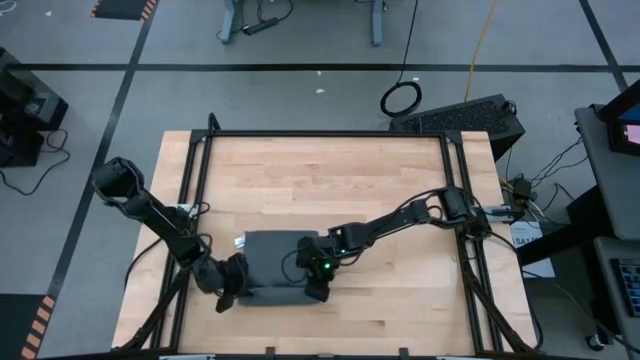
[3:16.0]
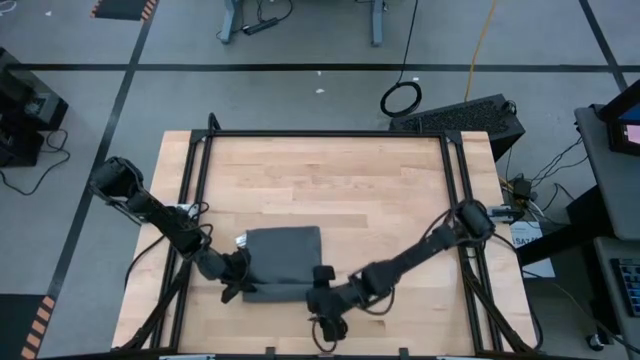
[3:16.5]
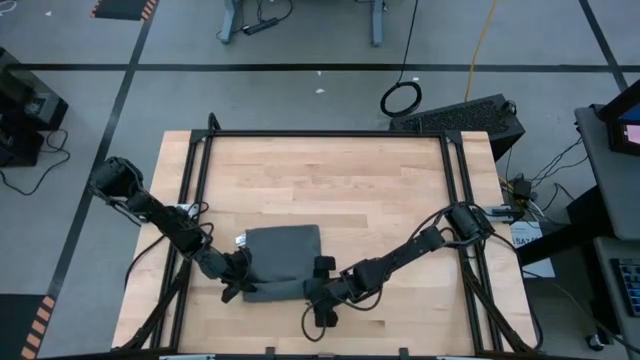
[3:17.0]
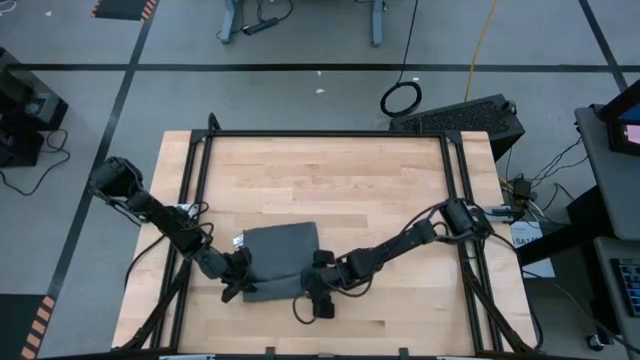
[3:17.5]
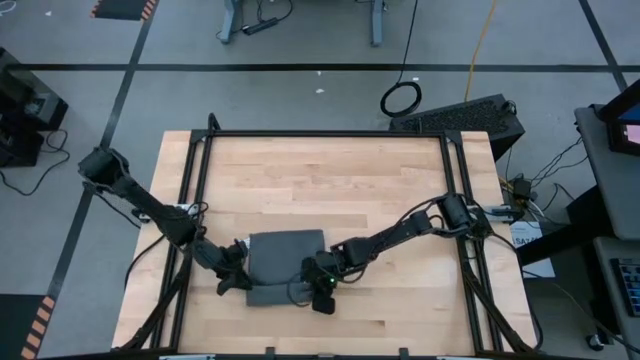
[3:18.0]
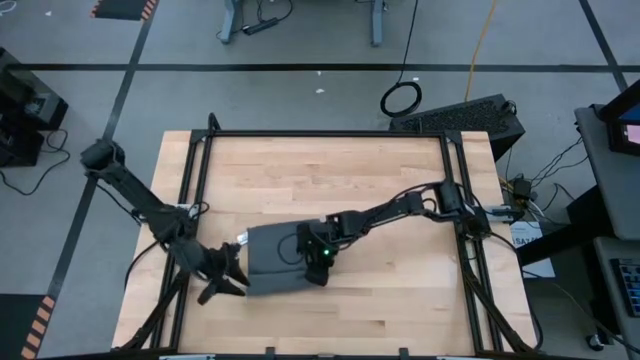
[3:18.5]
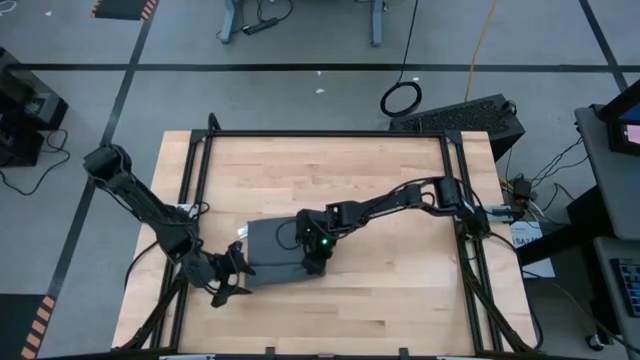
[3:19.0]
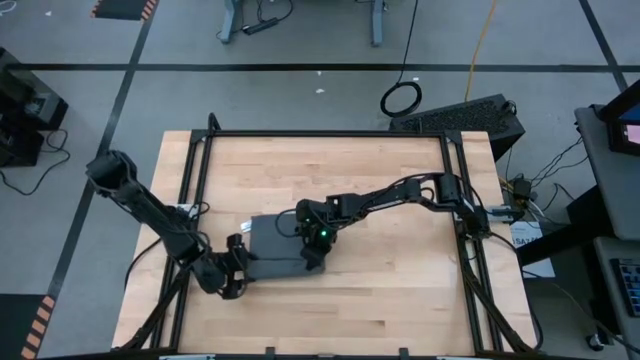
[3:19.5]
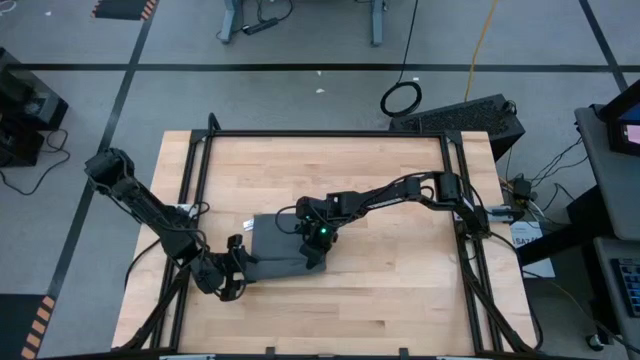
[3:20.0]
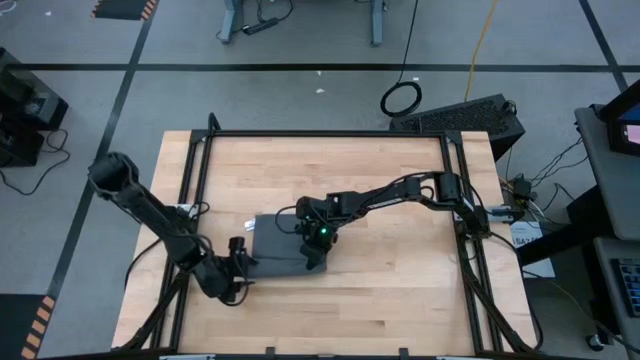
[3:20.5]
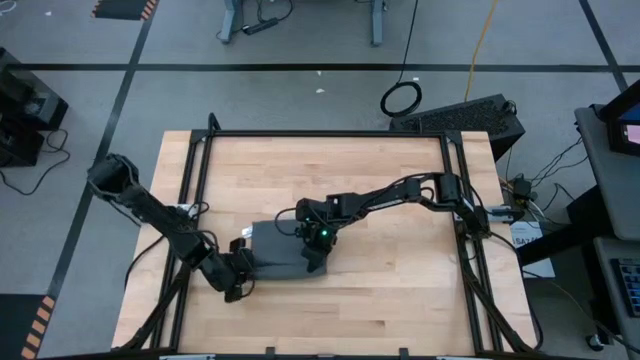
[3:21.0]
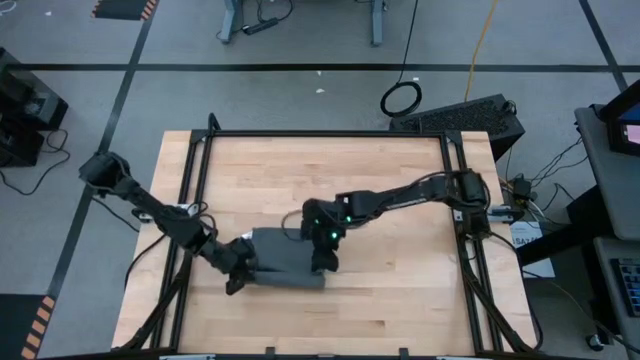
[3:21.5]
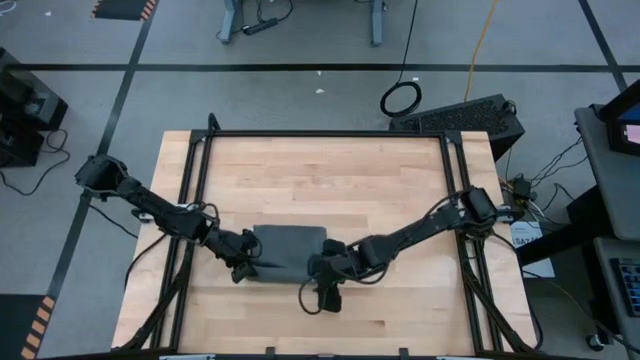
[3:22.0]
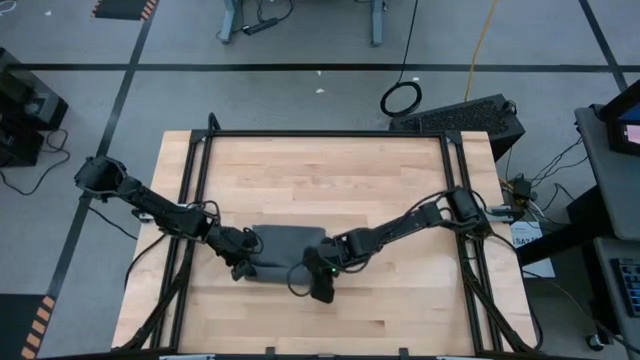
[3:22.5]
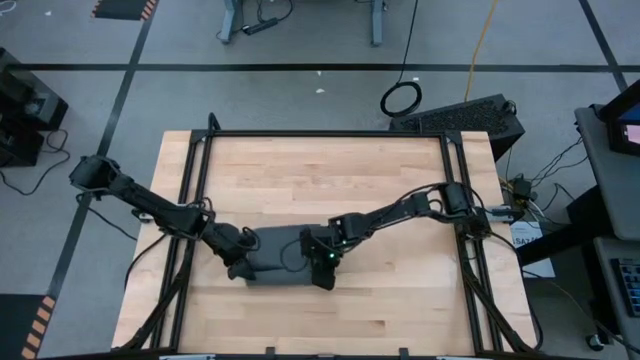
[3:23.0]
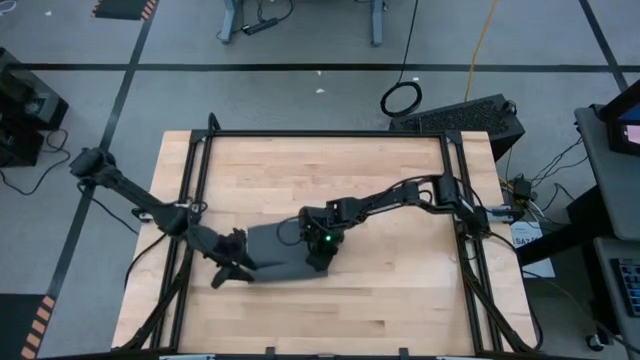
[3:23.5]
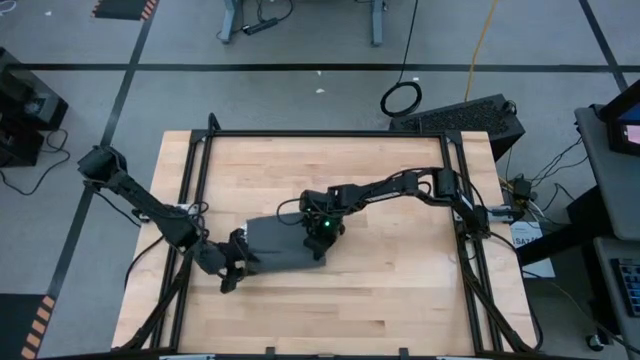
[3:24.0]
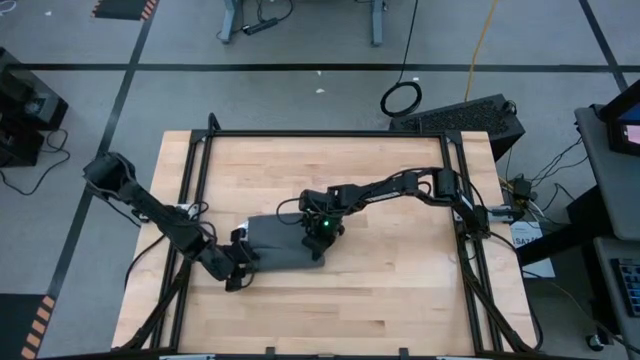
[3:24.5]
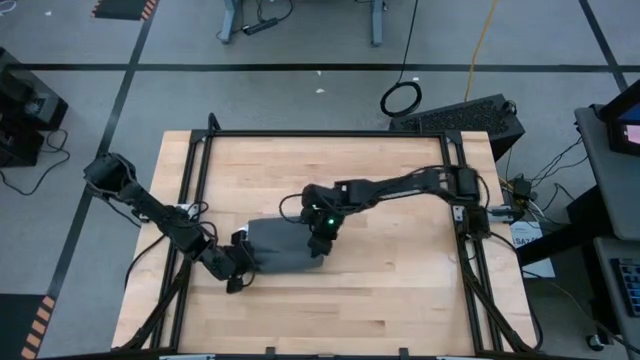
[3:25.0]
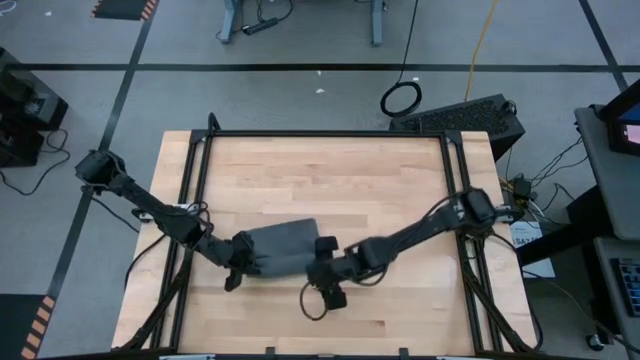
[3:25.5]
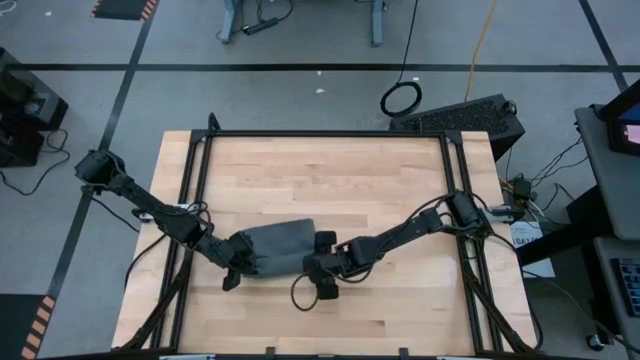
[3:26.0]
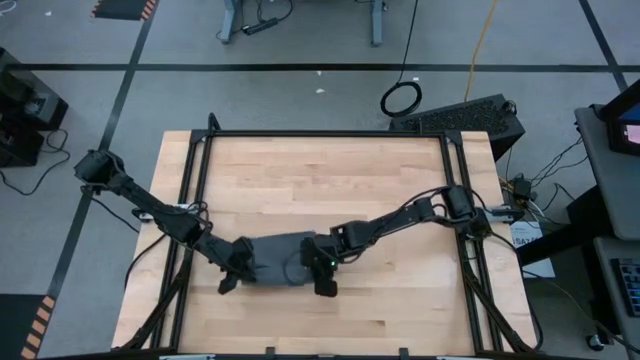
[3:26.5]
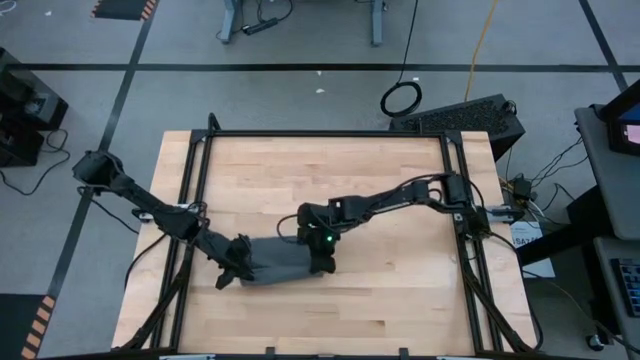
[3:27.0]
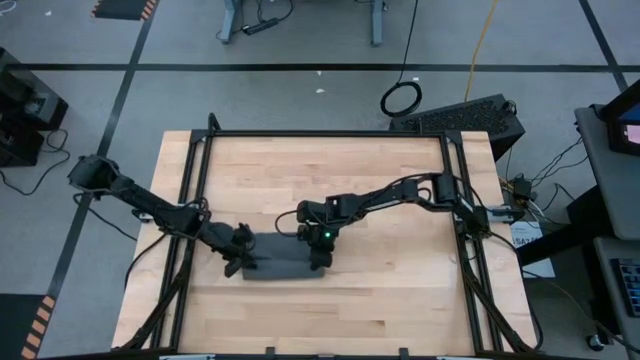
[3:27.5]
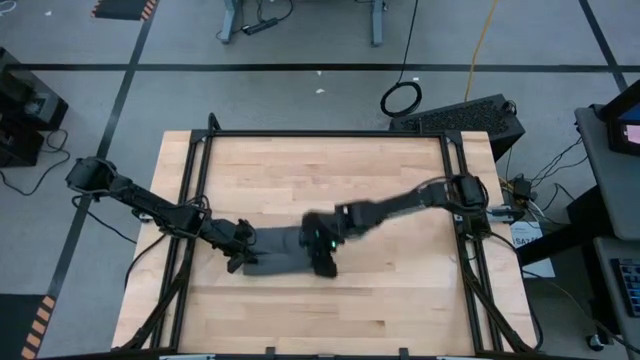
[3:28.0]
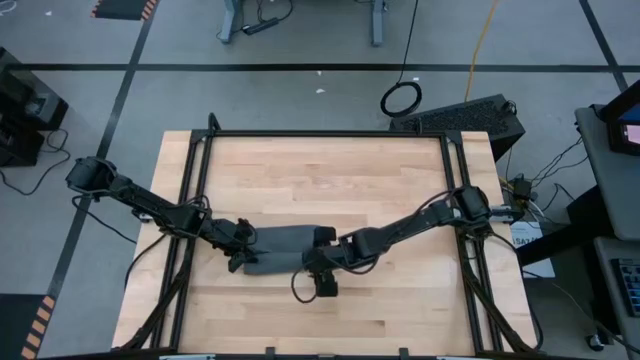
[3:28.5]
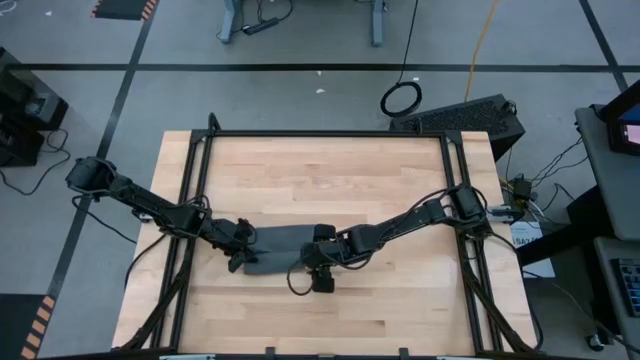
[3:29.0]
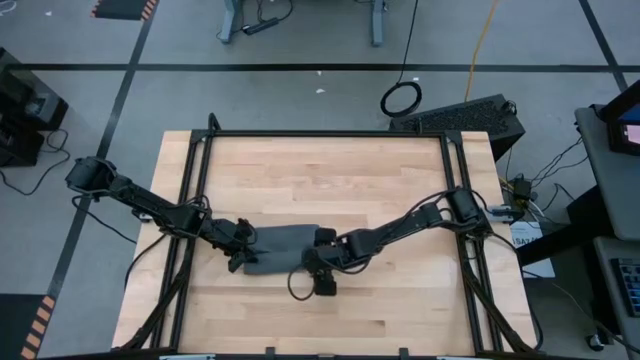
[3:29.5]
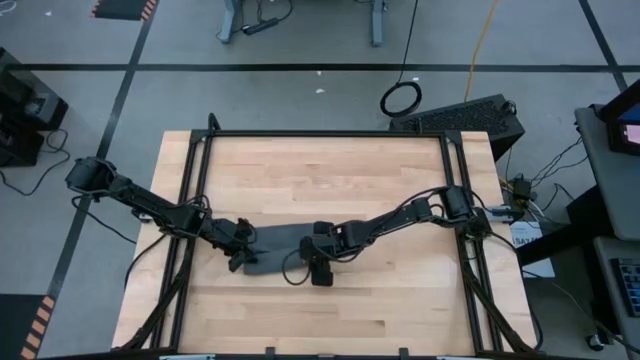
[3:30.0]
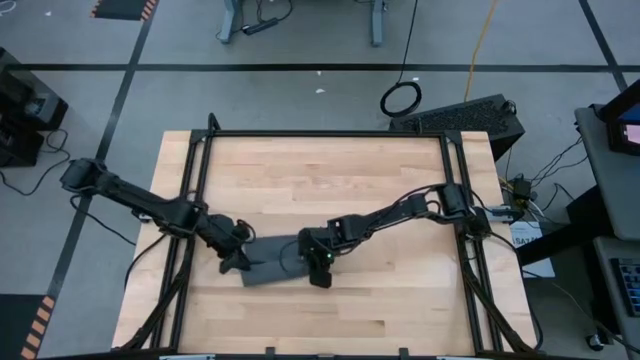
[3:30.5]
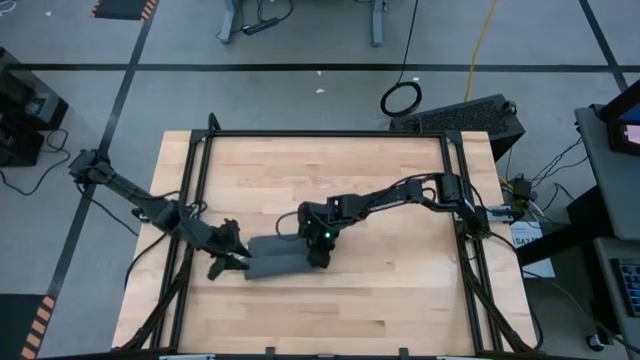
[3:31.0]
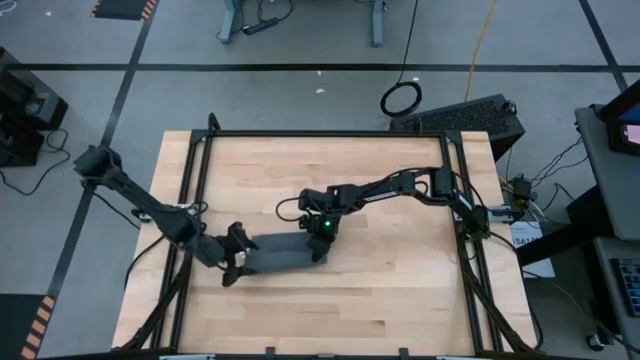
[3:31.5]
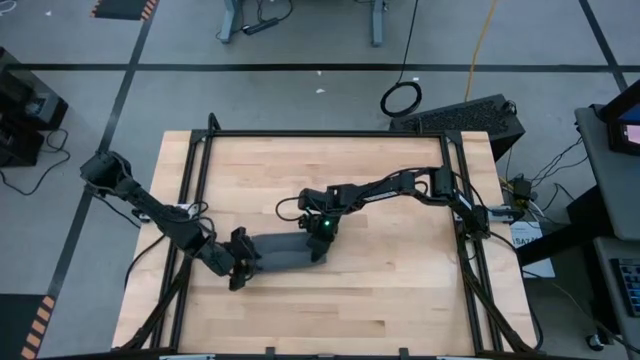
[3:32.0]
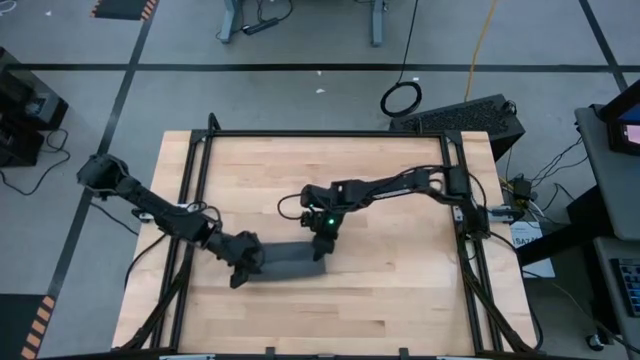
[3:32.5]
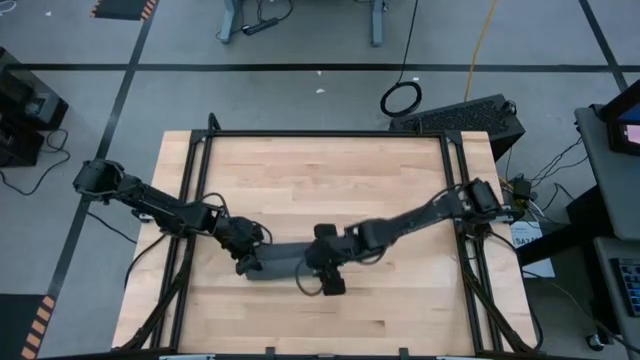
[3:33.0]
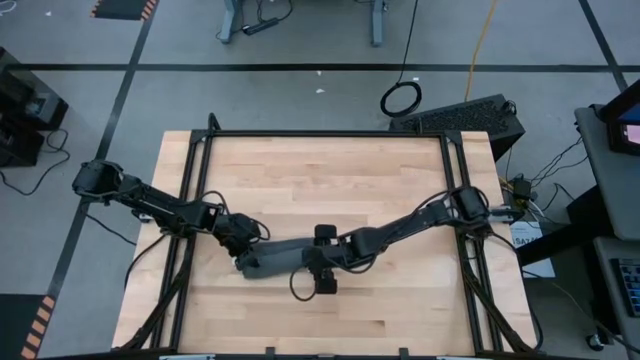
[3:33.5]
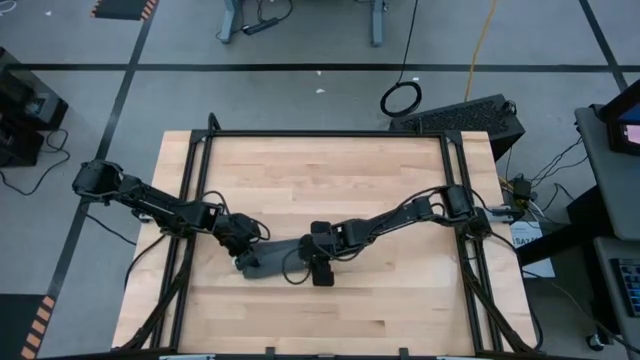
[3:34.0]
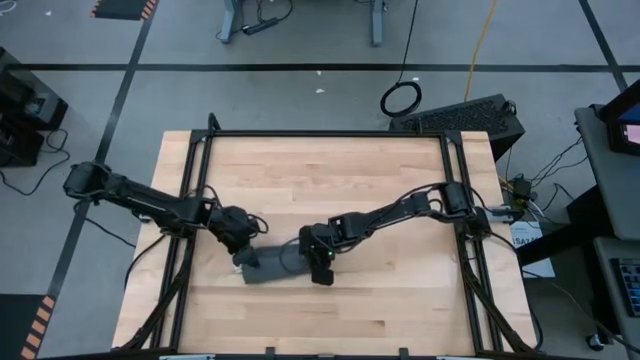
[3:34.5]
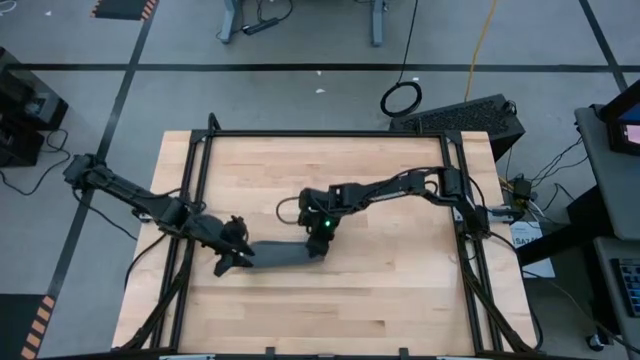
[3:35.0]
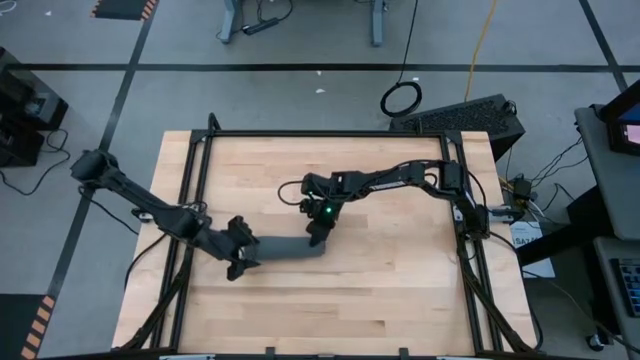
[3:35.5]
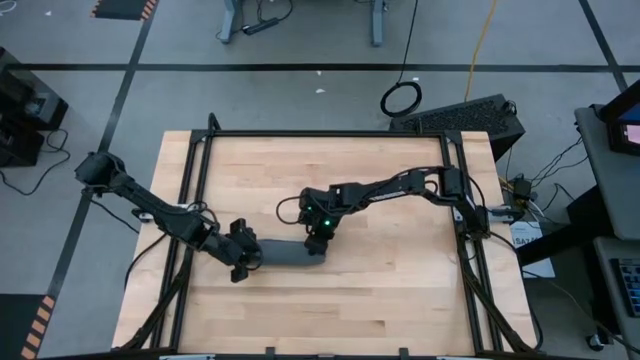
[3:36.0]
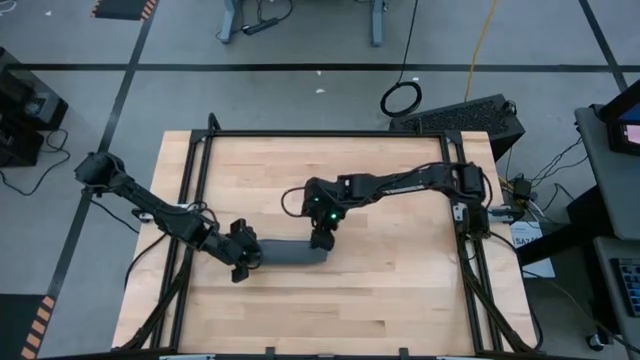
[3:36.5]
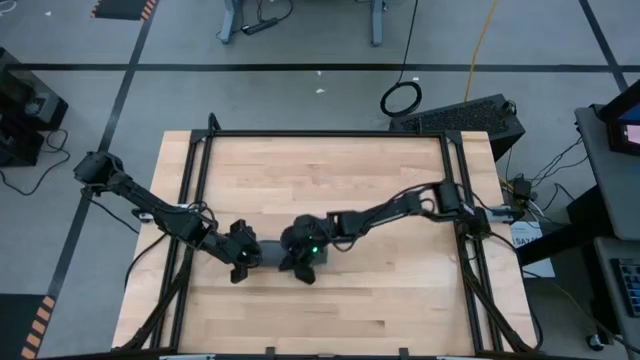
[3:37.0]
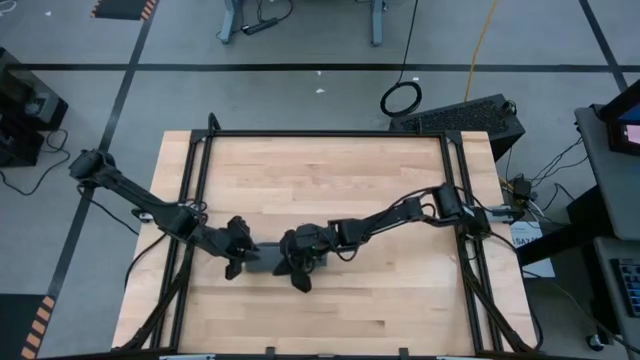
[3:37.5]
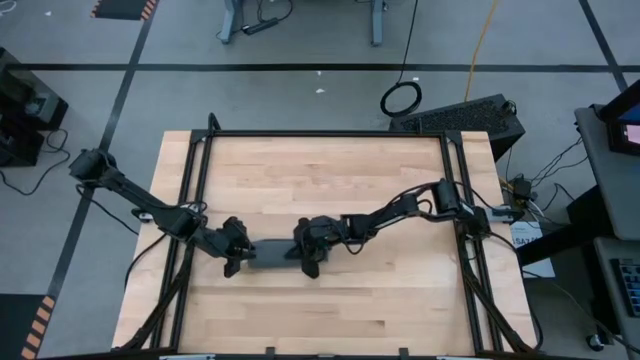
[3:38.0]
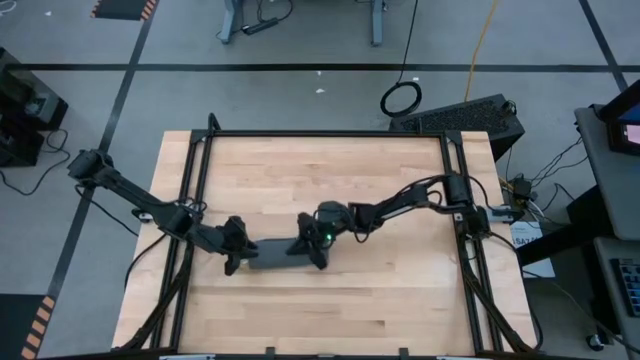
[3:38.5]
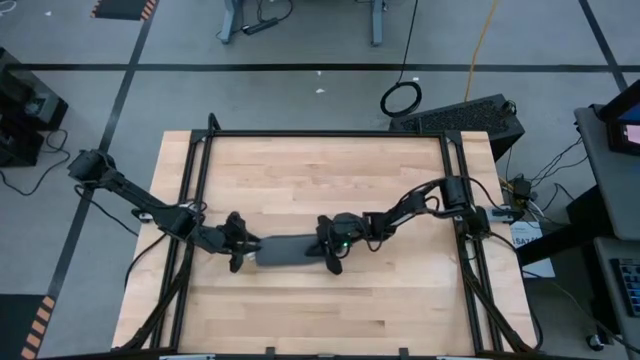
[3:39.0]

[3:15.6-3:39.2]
Task: Roll towel into tight, uniform cylinder
Roll the gray towel
